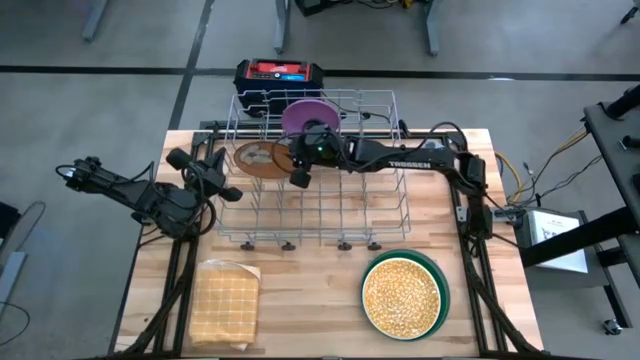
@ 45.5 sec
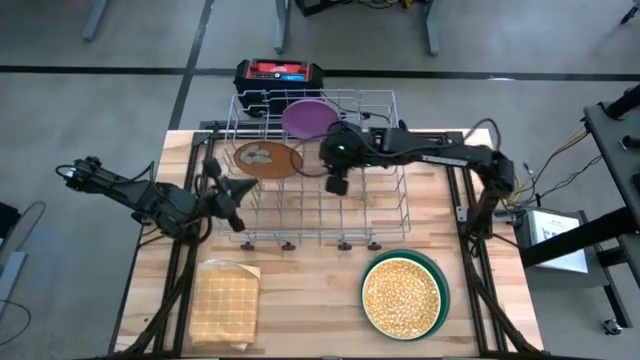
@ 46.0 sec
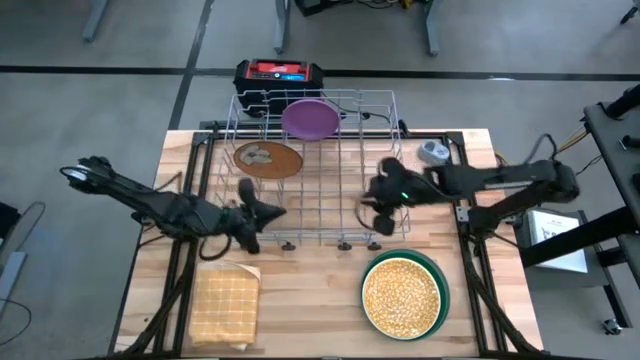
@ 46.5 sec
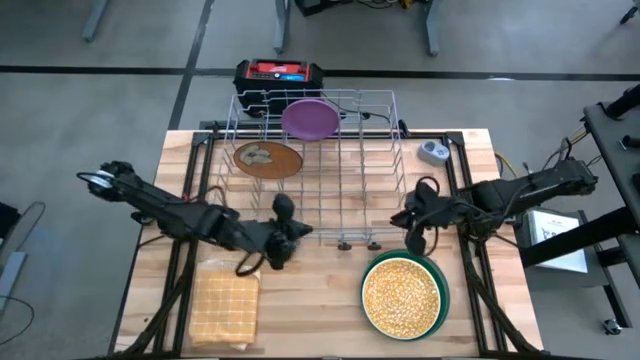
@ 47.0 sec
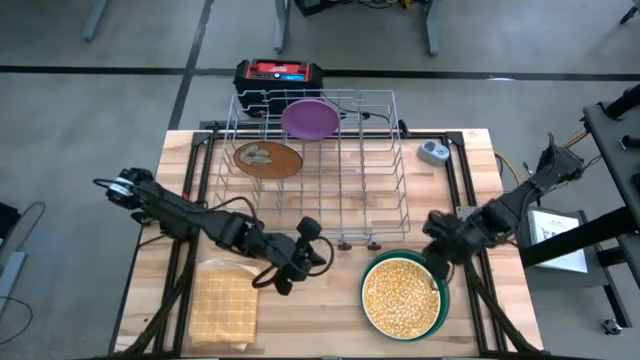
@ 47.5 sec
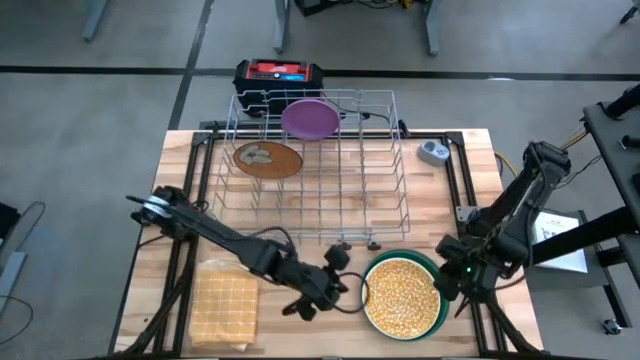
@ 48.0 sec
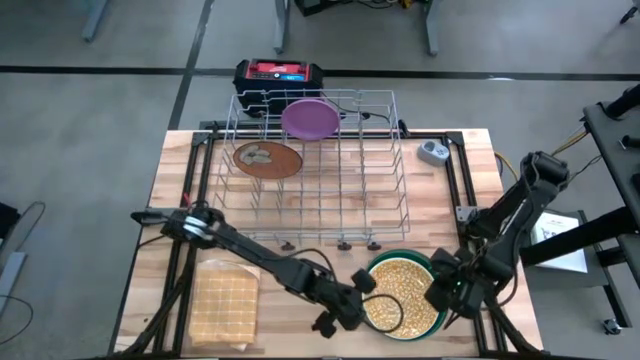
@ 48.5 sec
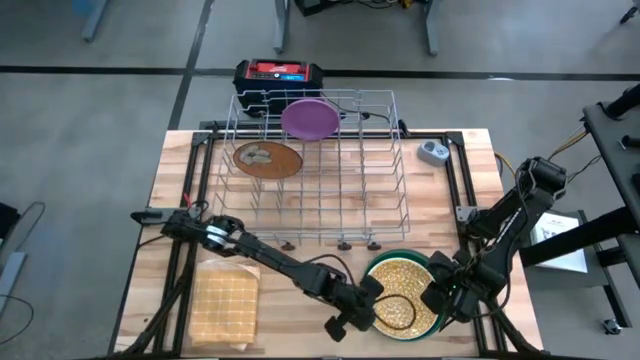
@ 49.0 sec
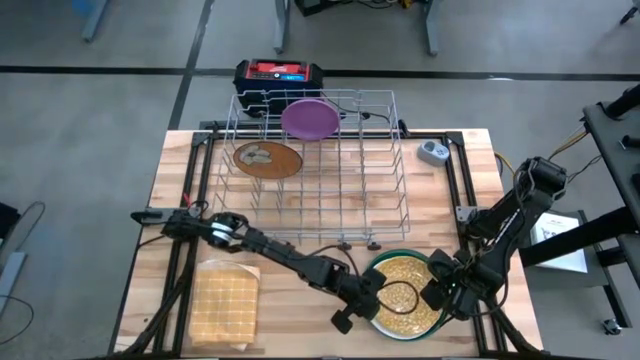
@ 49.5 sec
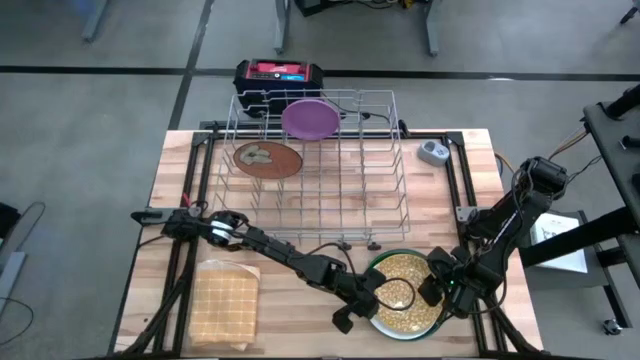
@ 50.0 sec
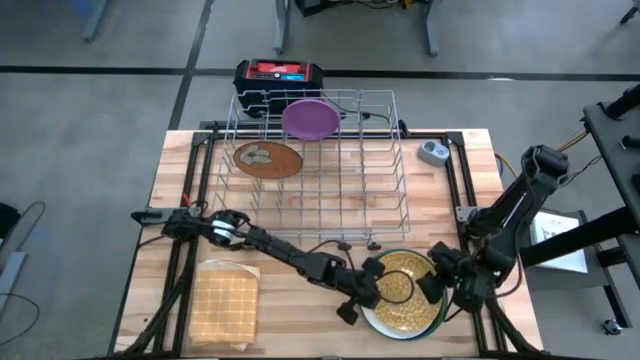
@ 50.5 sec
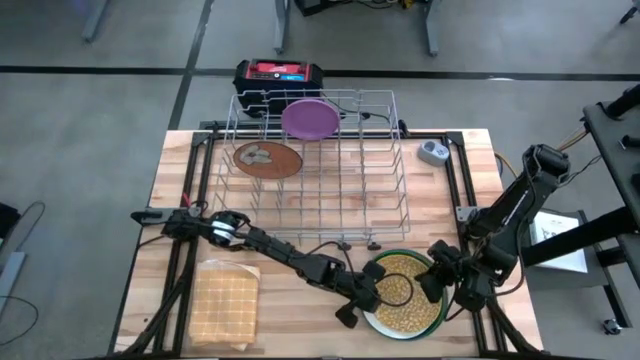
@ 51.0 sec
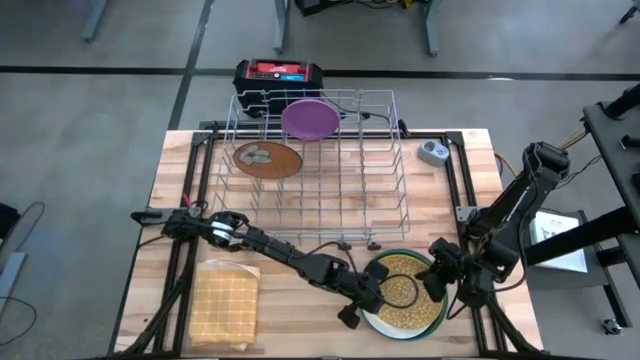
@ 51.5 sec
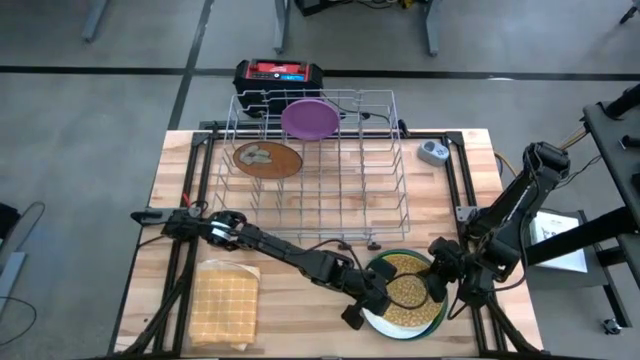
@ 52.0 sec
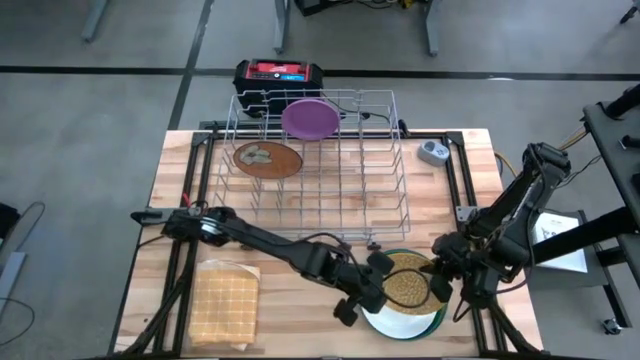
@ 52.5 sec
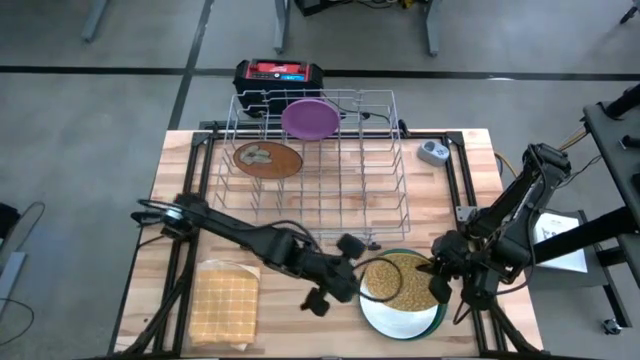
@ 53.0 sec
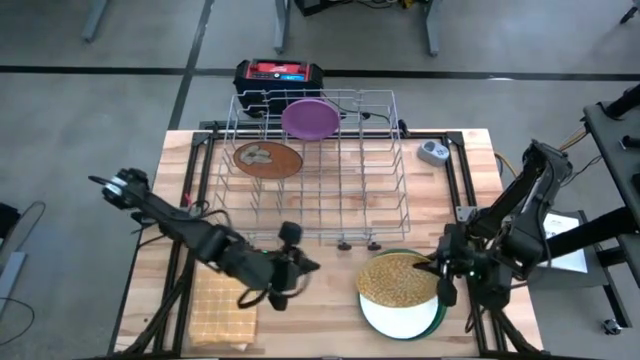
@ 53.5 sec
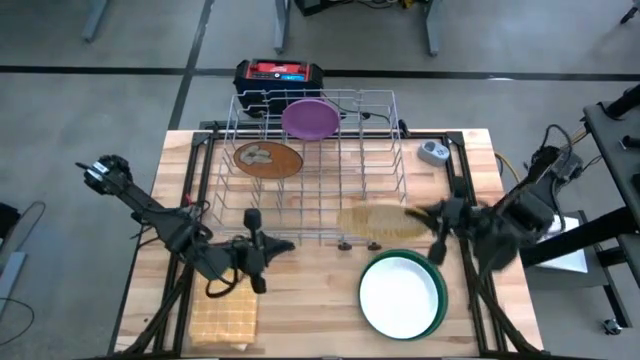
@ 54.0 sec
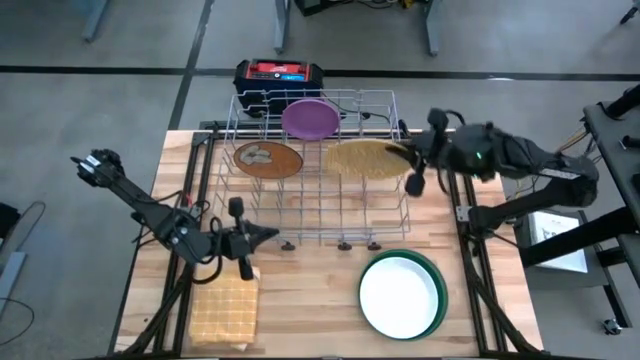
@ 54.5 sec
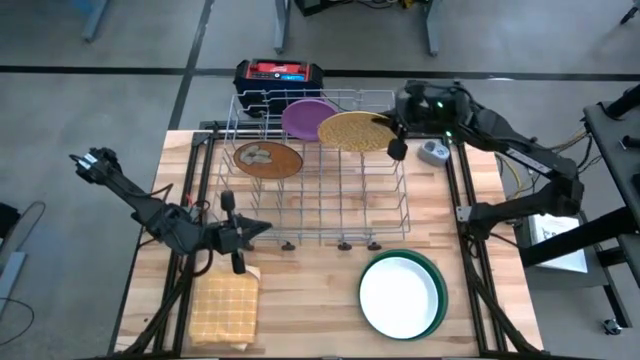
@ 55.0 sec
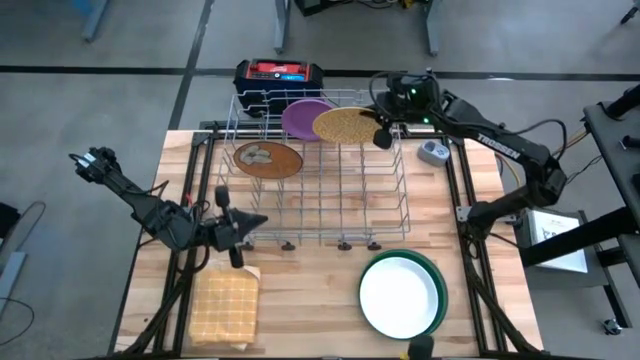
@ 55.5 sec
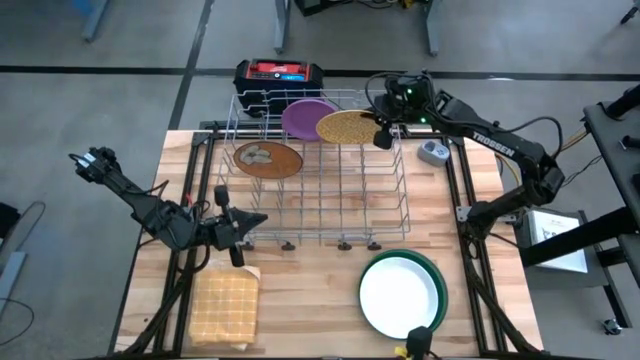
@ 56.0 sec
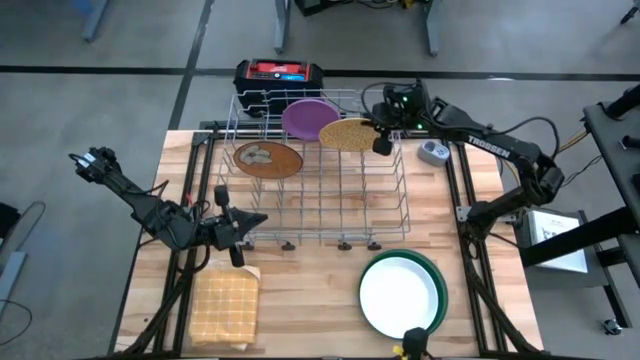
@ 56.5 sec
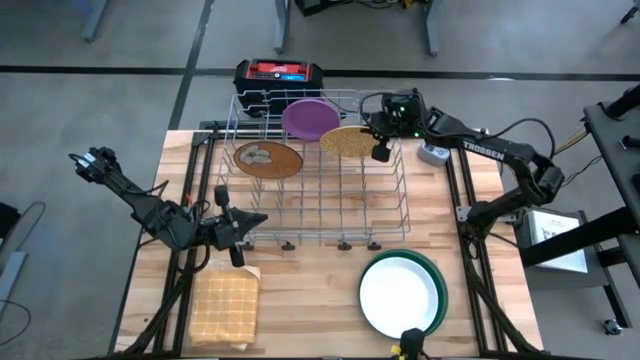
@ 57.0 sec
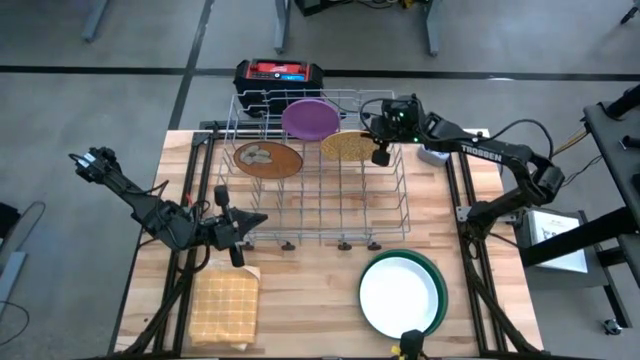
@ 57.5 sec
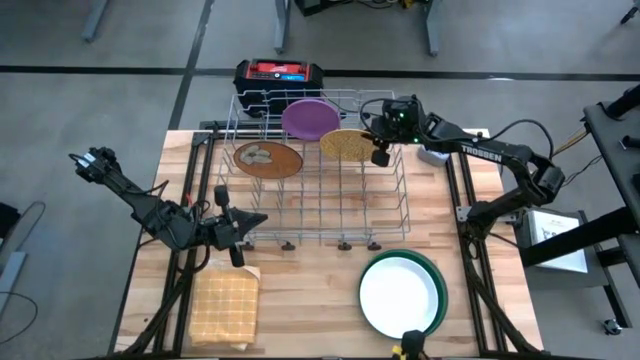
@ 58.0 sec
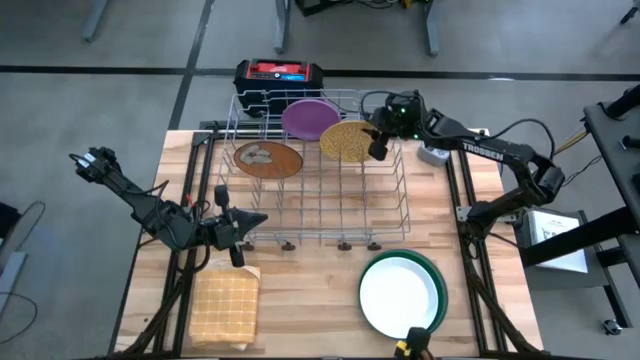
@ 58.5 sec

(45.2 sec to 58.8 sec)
Task: Sort dishes
Put the yellow plate into the dish rack
